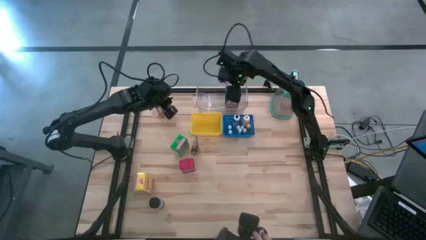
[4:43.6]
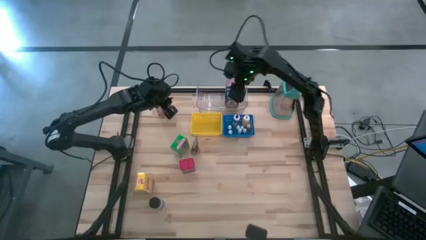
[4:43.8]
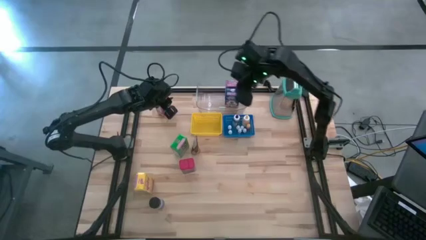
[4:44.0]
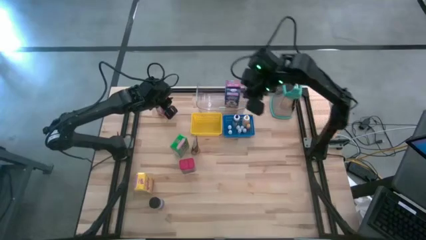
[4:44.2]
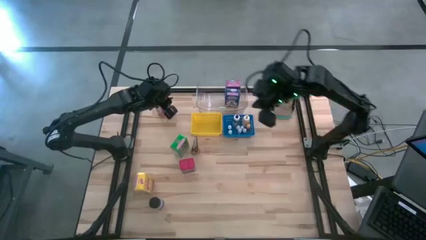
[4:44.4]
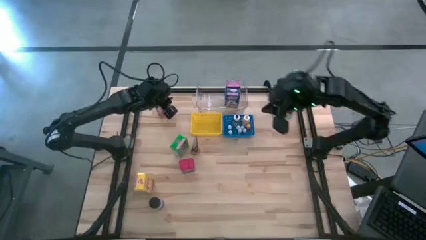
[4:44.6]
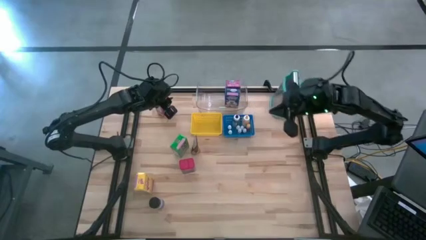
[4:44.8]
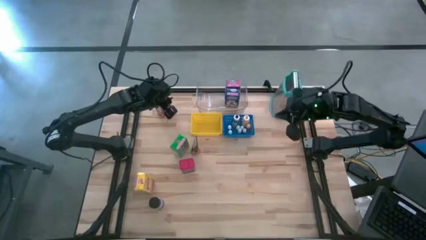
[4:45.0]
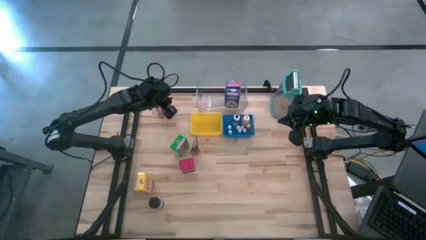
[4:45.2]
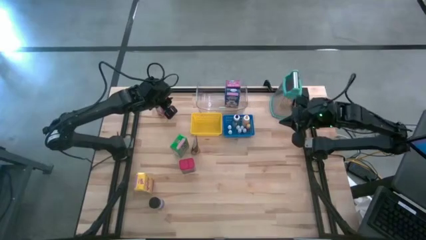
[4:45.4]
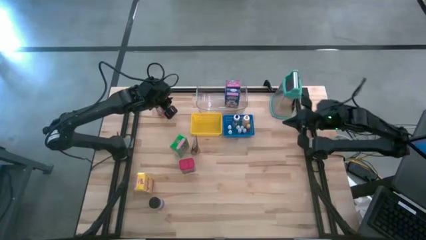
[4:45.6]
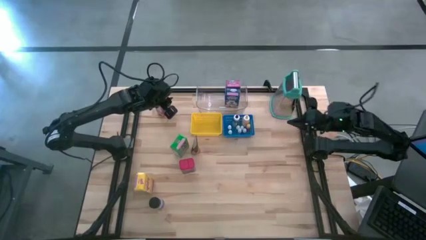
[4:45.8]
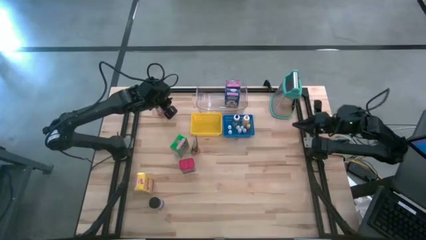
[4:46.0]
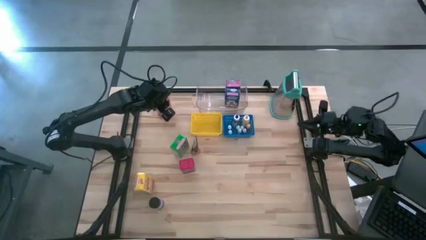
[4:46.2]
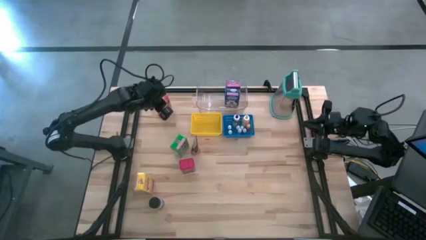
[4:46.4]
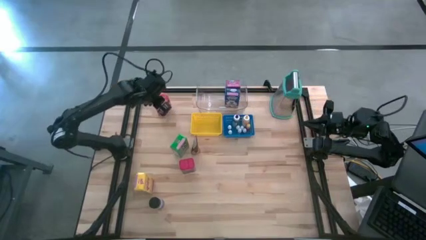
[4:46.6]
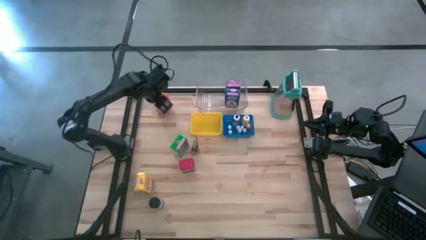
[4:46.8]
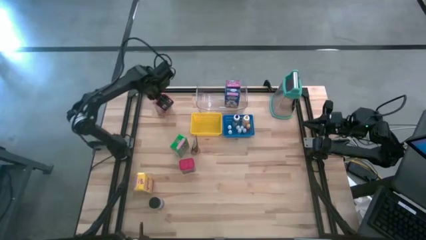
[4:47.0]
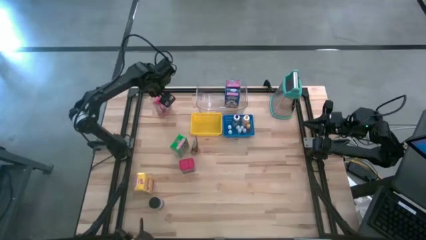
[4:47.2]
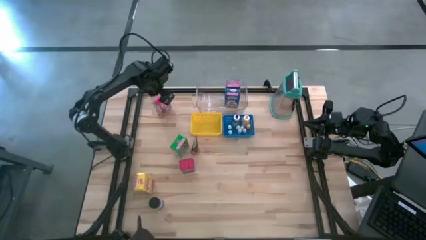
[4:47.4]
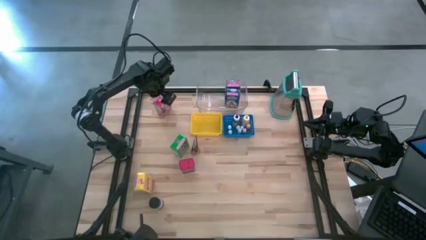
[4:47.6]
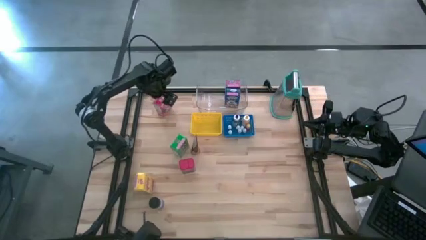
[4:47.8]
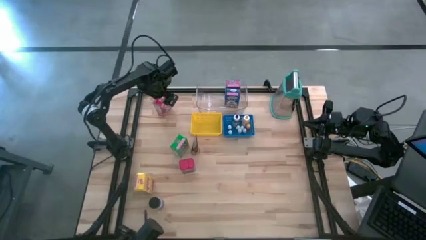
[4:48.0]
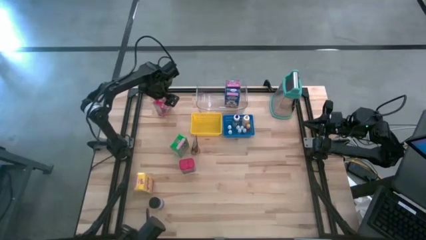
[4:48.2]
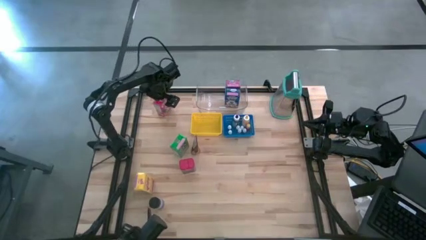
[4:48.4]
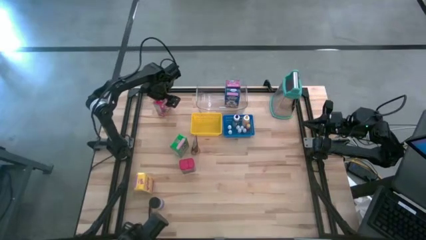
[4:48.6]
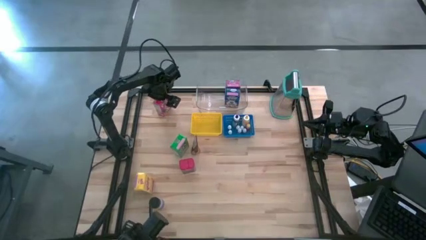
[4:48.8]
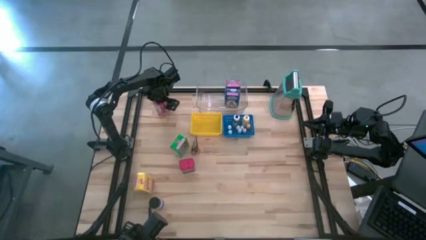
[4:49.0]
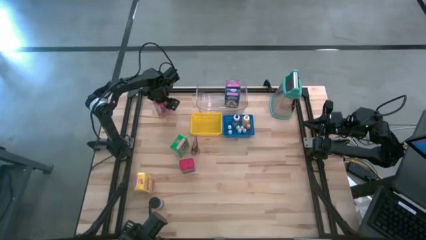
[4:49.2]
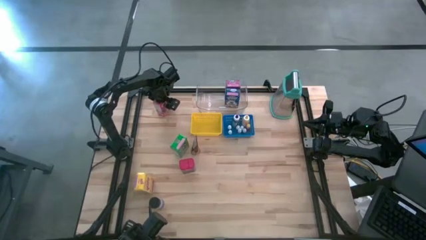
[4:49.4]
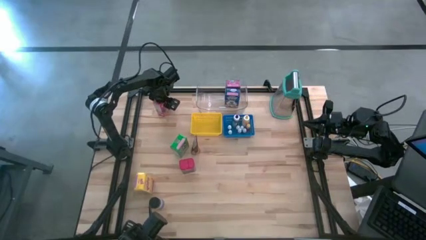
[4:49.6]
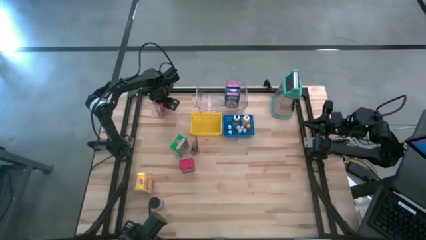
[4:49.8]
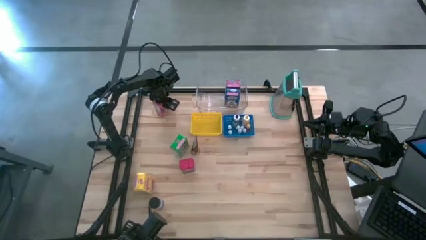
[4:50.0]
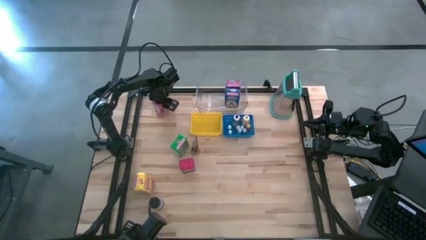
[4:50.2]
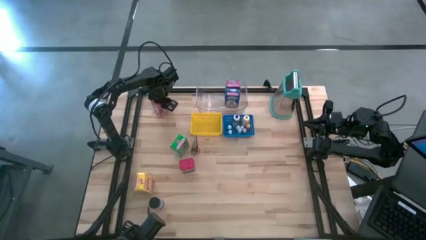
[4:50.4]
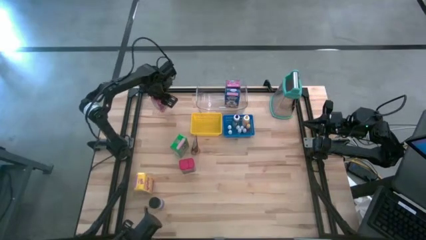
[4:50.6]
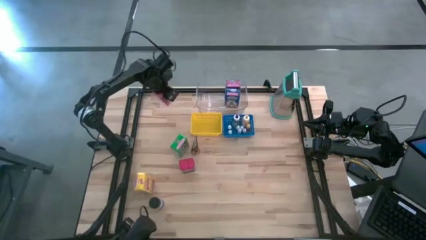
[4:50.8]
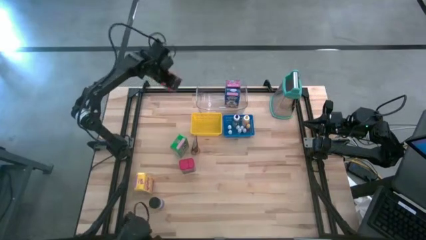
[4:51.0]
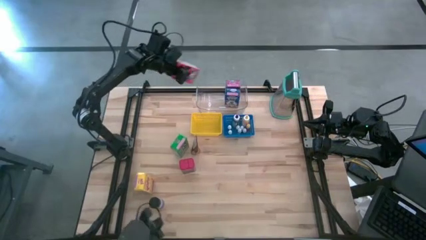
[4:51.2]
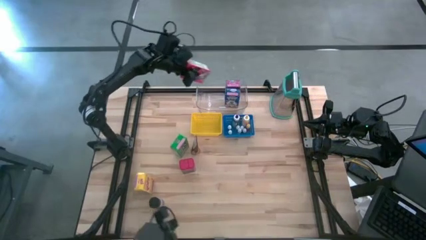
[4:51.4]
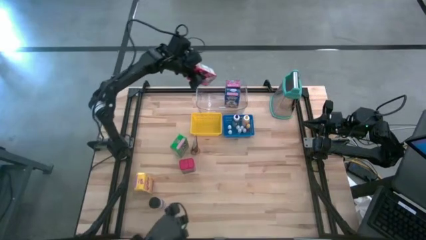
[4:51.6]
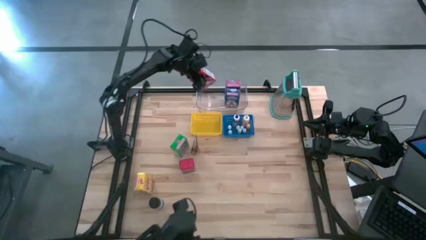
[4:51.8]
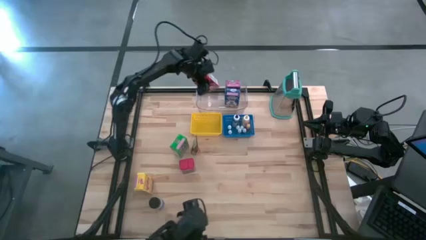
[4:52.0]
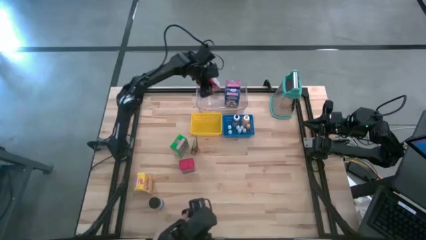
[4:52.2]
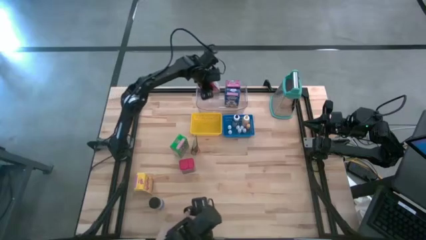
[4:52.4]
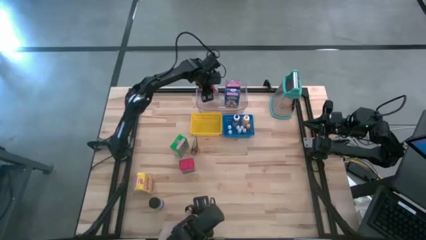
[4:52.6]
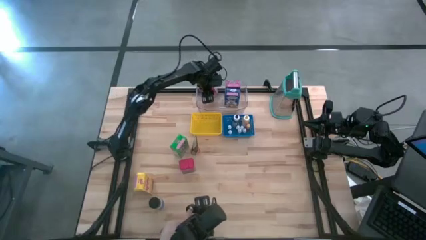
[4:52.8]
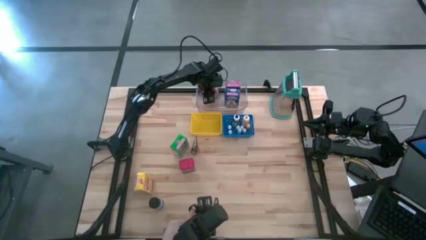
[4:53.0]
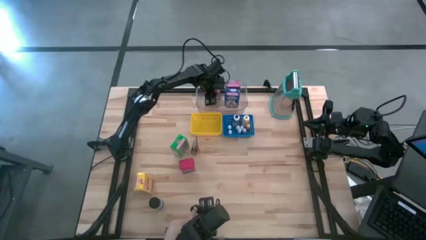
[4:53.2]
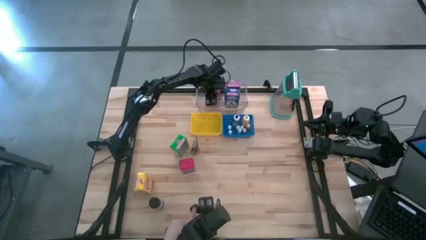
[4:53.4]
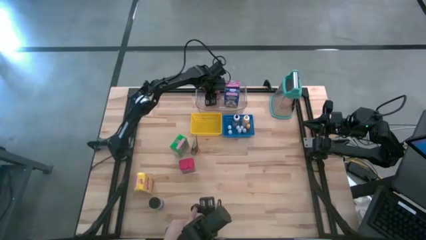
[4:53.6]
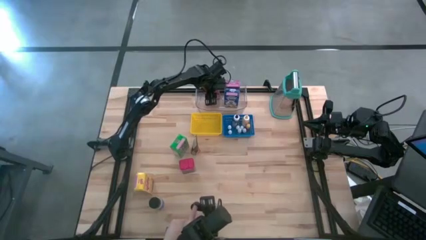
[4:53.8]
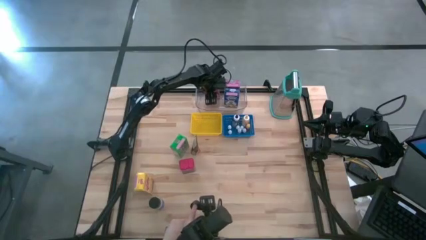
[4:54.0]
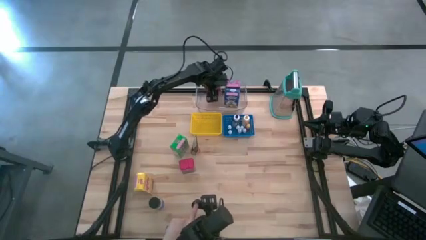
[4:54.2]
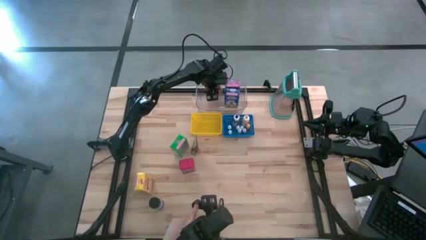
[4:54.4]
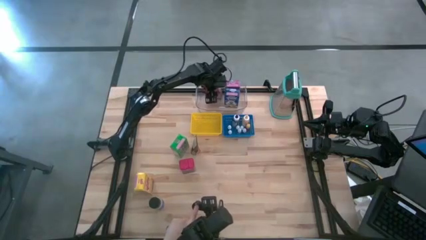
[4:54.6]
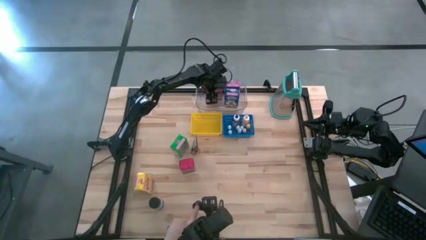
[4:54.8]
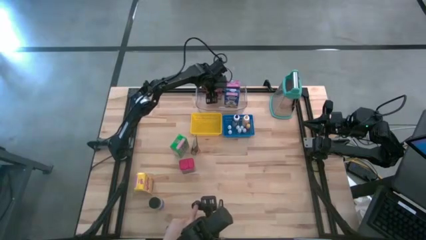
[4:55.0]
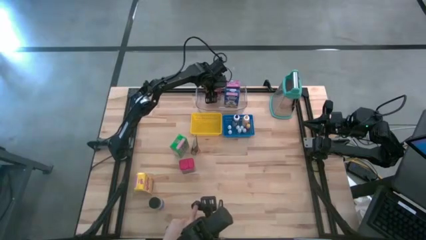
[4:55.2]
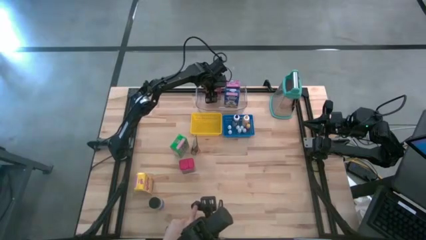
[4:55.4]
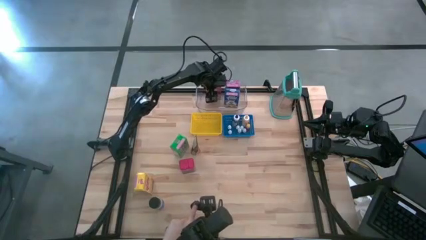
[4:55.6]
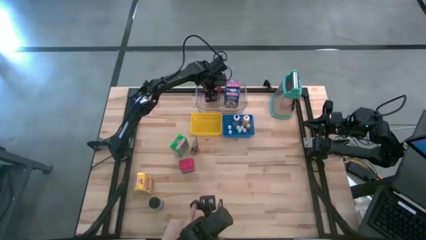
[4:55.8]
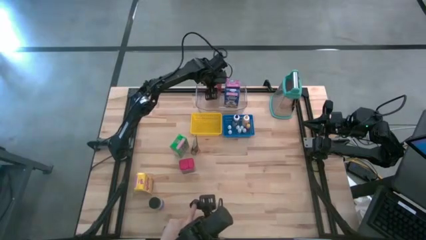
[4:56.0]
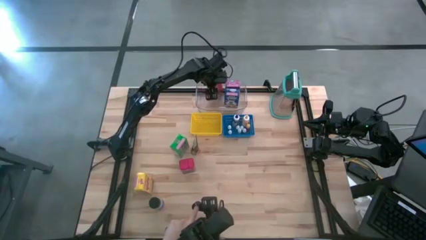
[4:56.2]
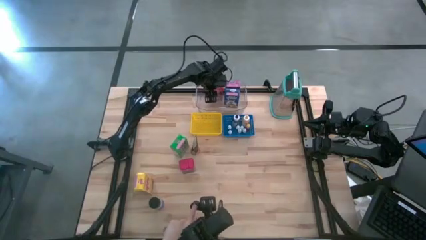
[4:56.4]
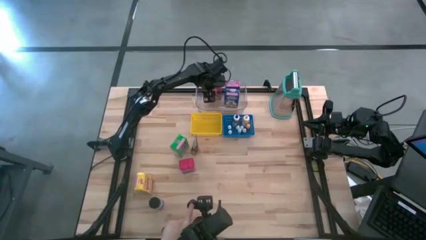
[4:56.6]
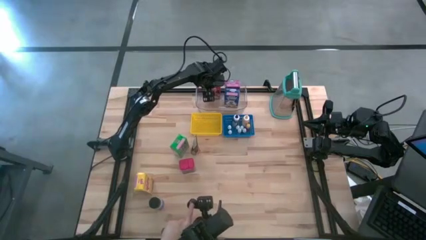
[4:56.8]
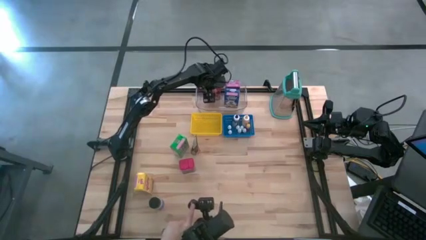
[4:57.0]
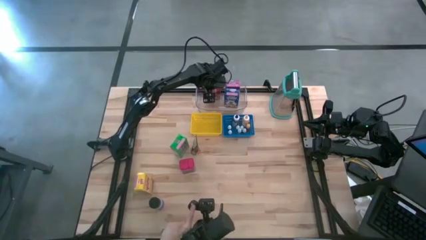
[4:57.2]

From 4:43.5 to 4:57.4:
Task: Pick & Place Kitchen Items
Put the red cereal box into the transparent bin
